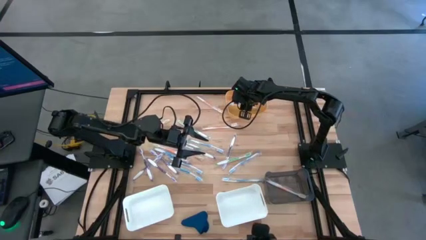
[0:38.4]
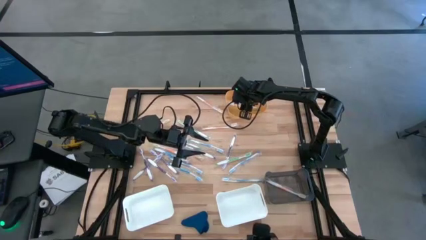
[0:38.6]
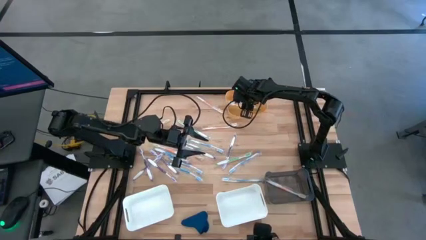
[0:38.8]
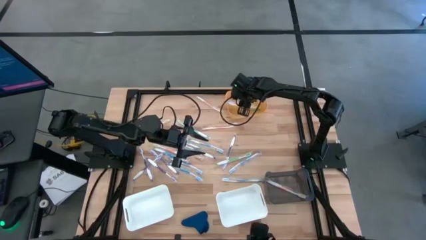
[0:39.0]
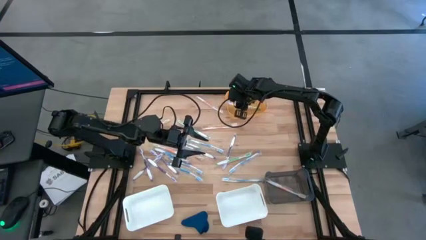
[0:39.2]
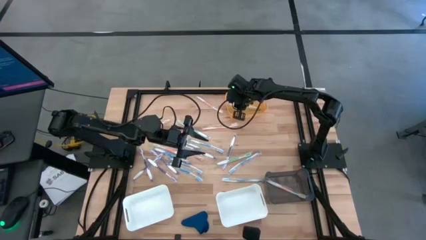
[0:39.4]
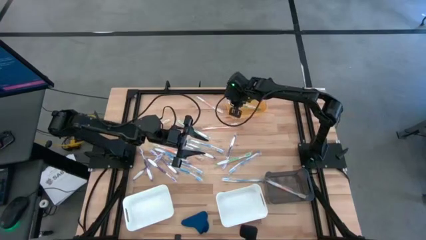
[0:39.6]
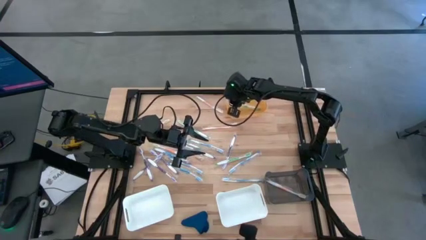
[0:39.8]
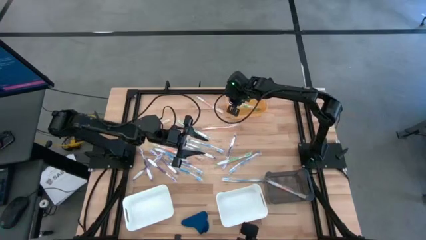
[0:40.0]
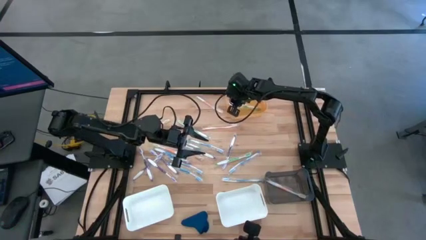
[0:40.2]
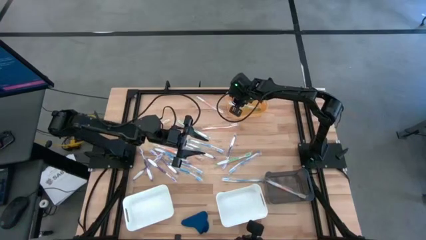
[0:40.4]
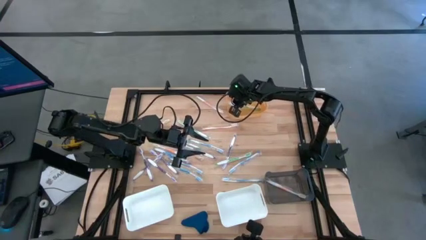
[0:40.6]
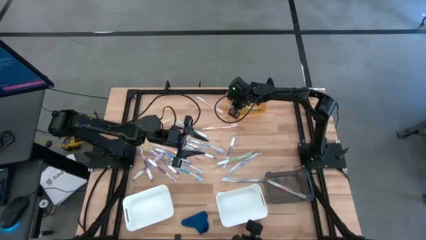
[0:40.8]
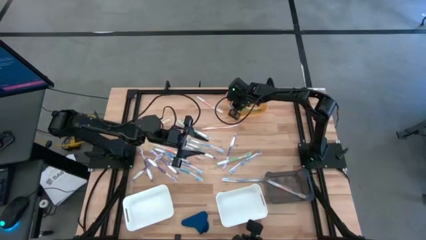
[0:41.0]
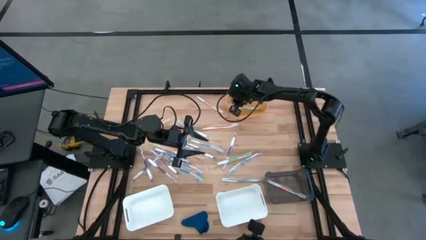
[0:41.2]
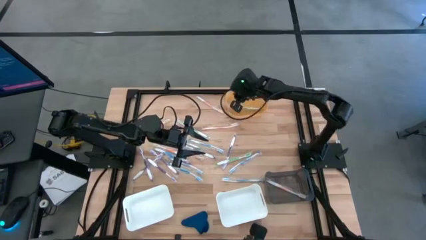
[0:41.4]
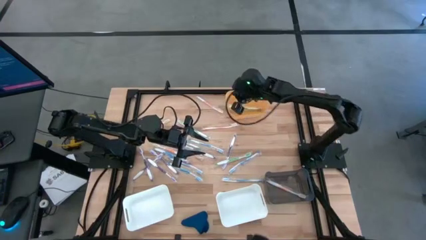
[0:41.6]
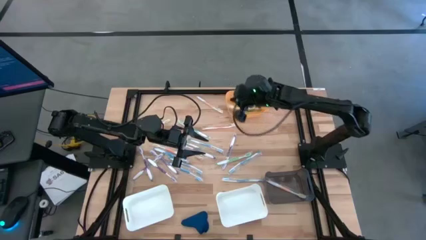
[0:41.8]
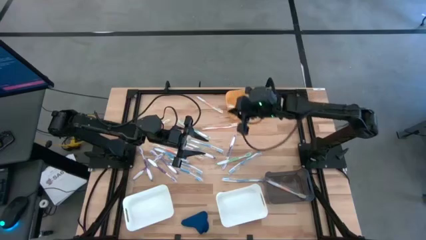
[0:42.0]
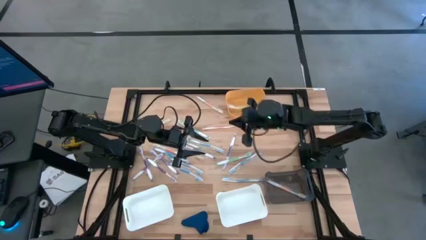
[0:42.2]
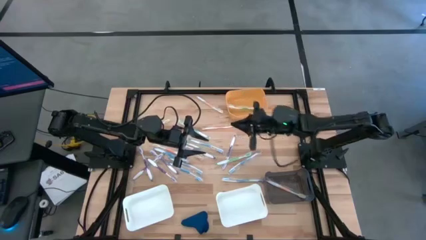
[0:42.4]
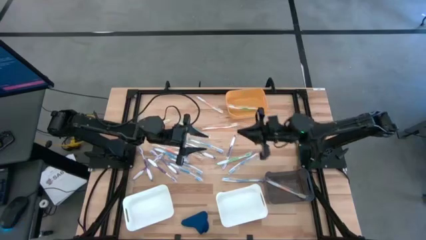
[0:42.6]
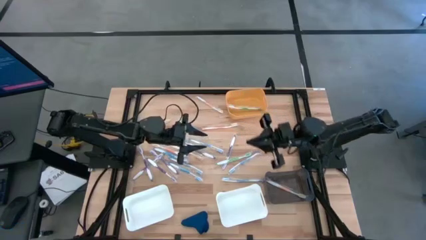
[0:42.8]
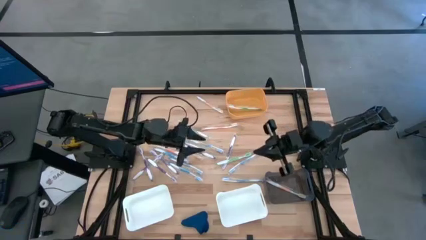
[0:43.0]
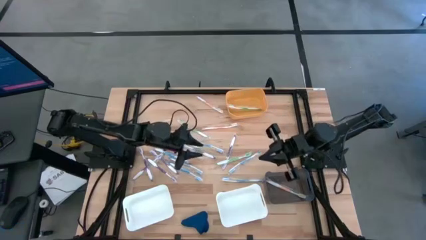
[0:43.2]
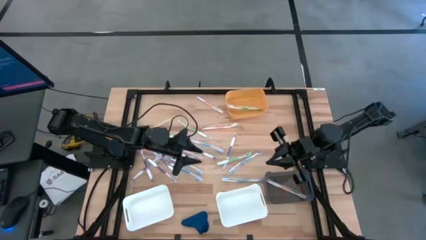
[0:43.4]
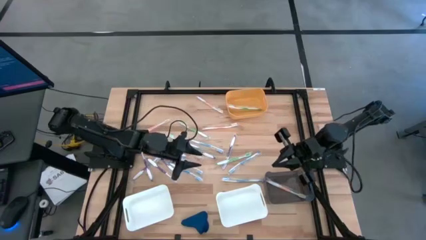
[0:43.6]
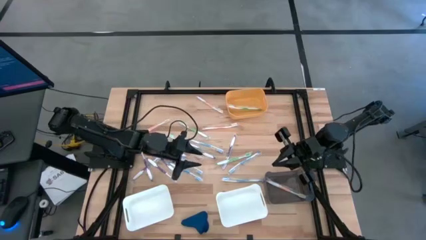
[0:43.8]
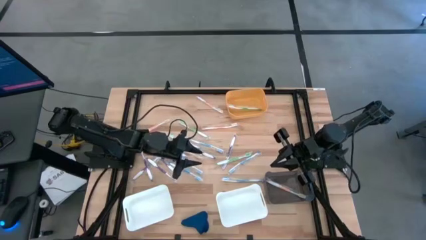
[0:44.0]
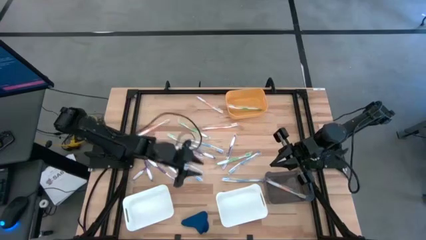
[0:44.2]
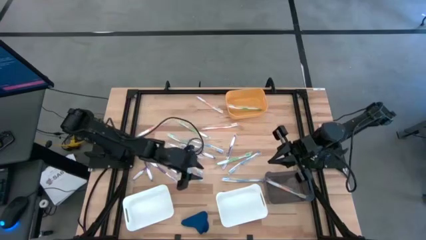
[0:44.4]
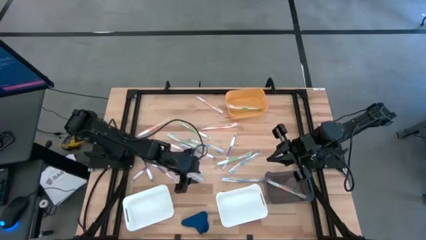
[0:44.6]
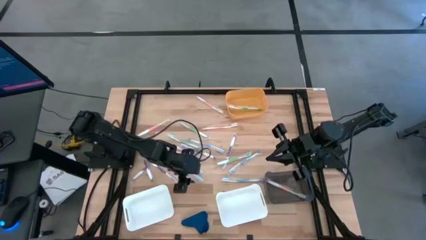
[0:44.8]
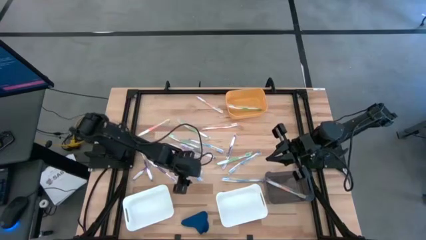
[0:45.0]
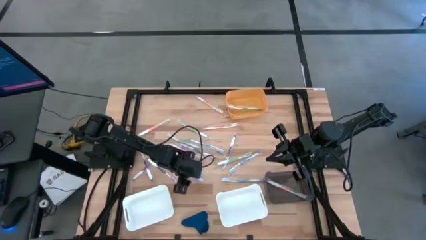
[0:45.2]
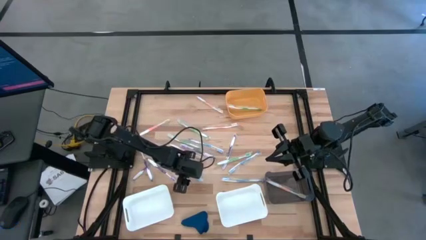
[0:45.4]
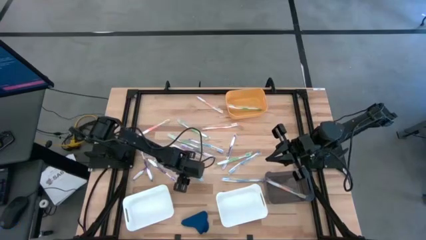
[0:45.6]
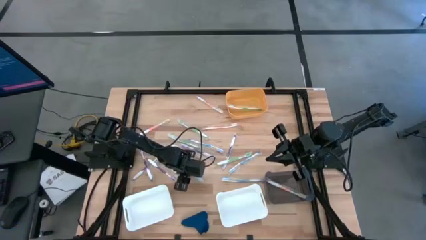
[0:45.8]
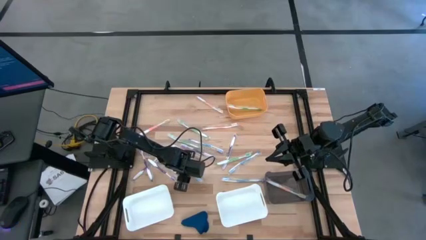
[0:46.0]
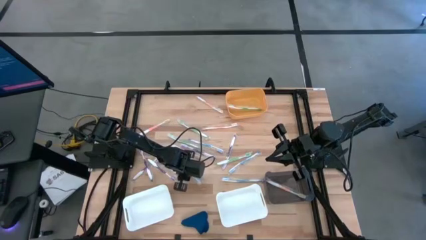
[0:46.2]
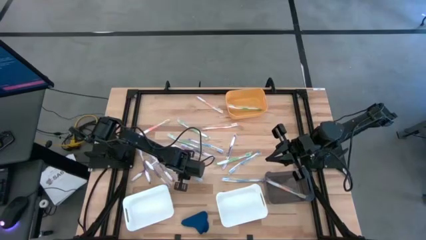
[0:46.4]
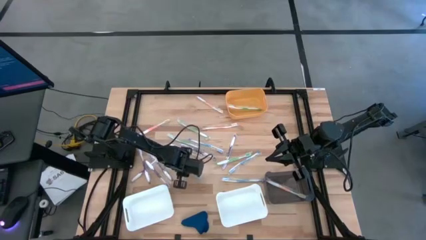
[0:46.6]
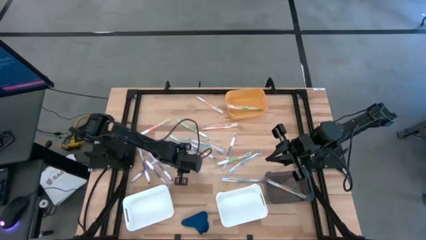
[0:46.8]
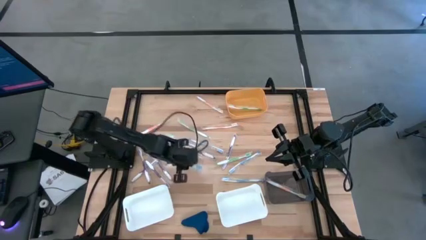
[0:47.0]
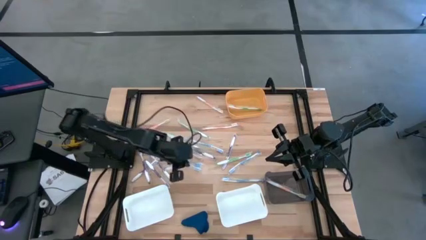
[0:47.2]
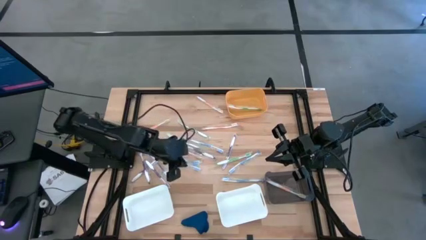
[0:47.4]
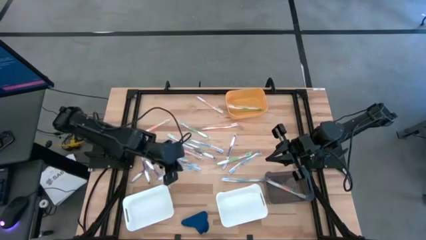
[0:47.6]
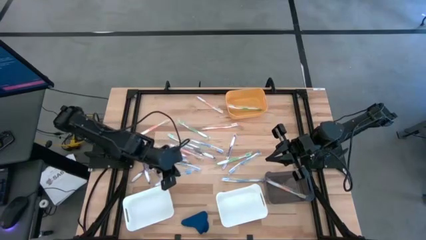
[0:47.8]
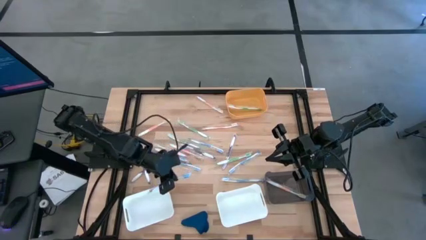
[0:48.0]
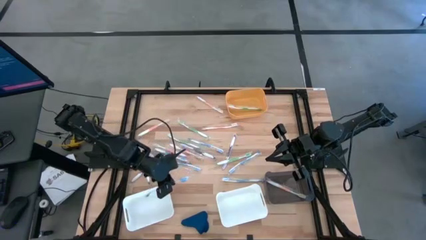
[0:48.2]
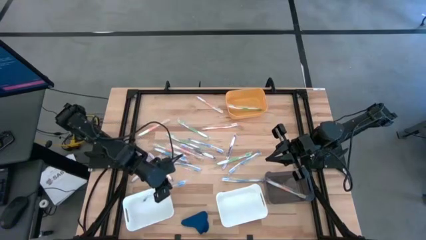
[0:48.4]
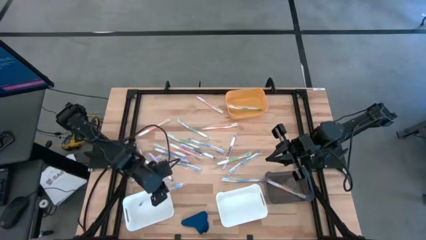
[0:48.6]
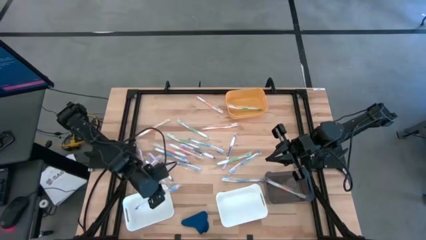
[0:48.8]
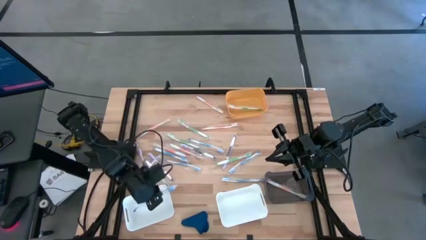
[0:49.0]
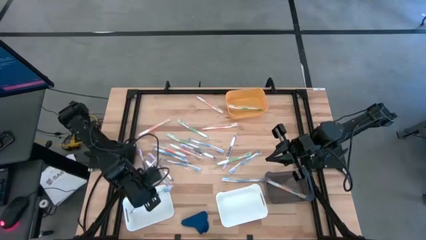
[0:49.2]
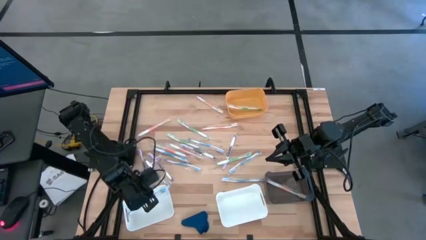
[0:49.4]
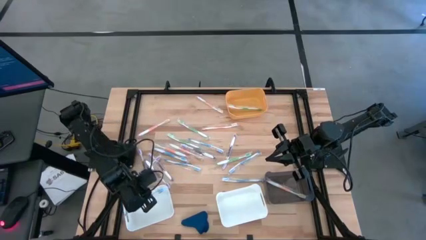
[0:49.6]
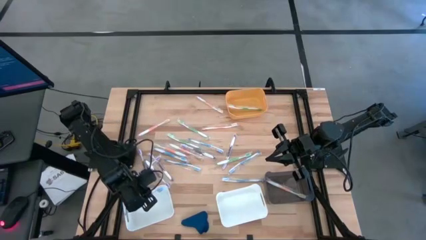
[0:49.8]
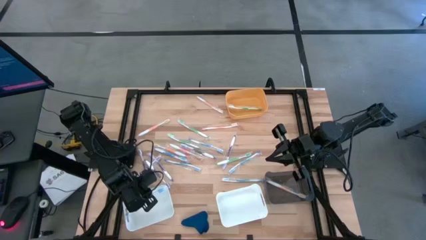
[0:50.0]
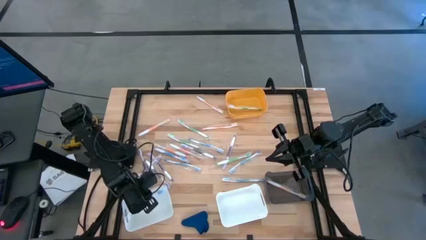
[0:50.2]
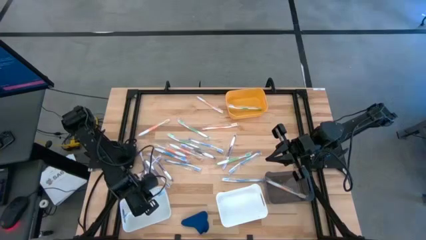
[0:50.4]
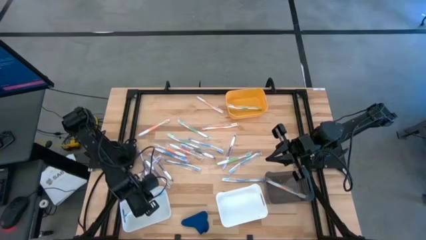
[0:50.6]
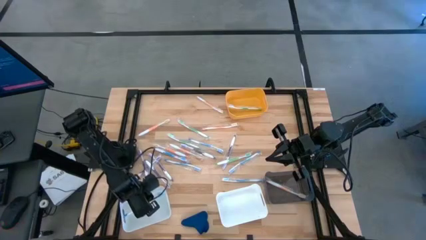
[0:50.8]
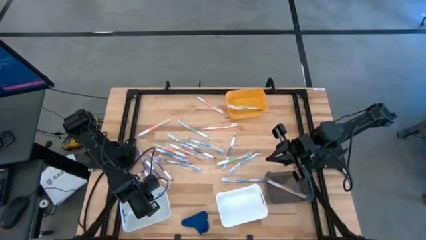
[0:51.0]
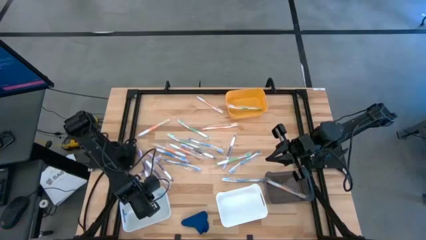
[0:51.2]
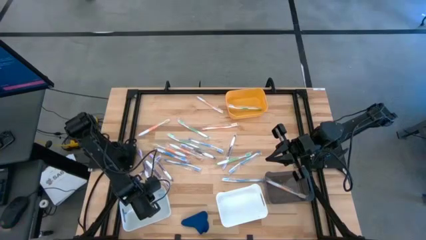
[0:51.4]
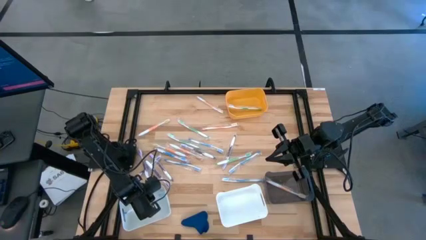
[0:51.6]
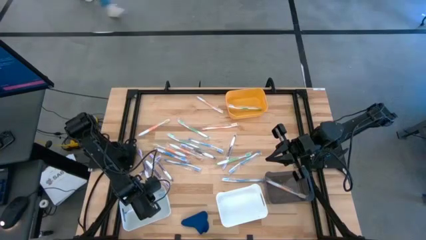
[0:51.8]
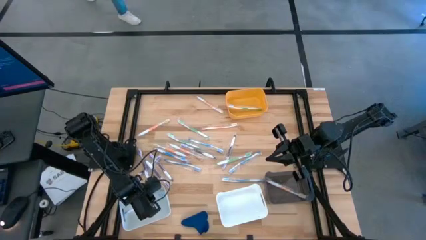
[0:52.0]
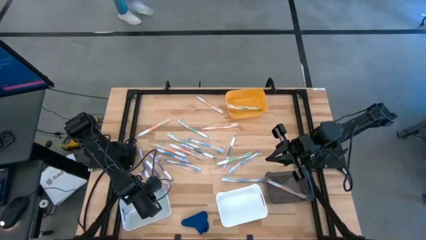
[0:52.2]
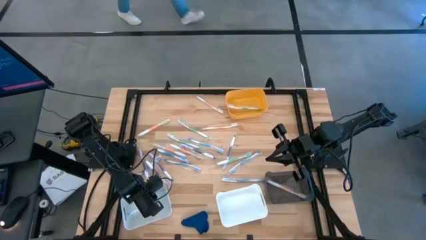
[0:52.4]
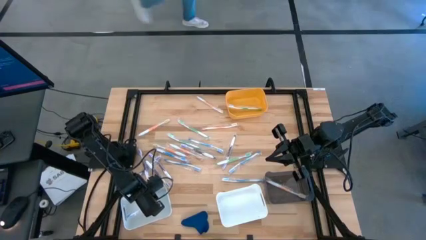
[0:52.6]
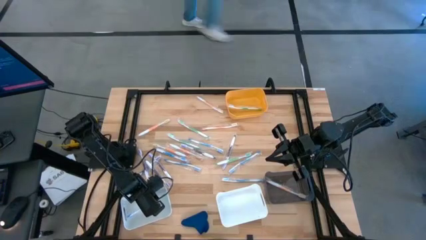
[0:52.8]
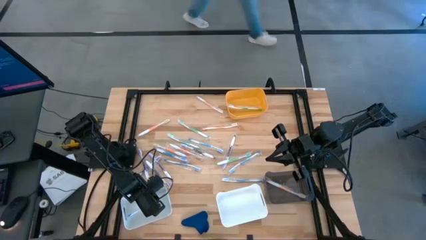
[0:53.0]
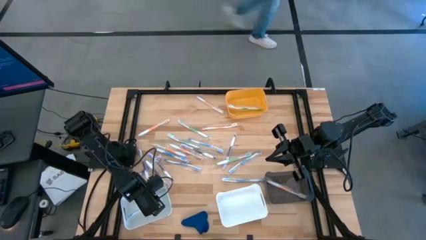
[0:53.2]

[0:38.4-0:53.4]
Task: Pick & Place Toothbrushes
Put the blue toothbrush into the left white bin
